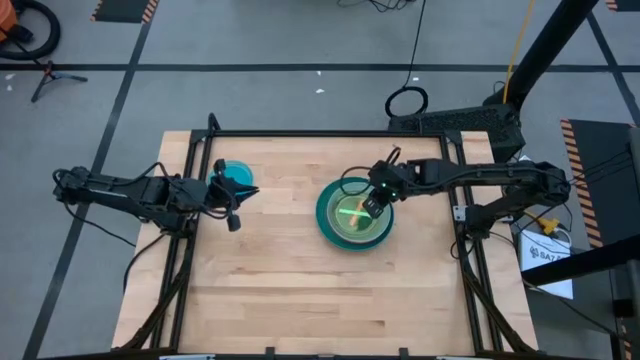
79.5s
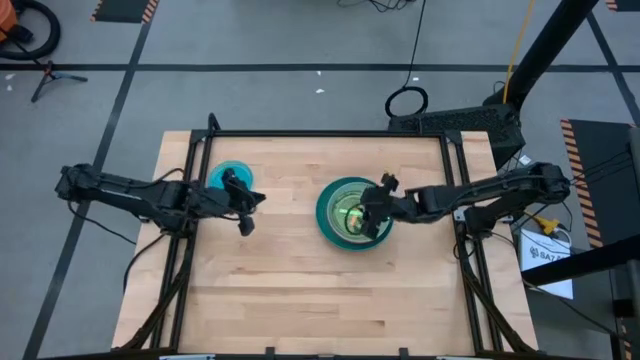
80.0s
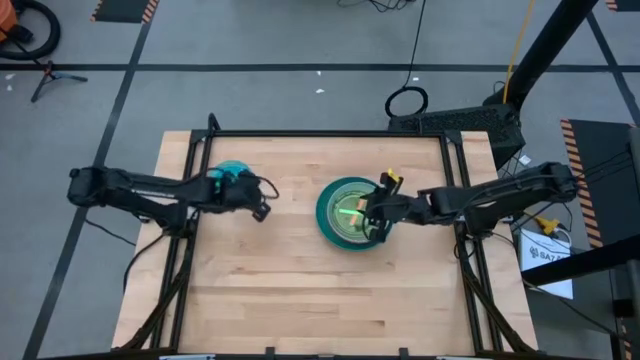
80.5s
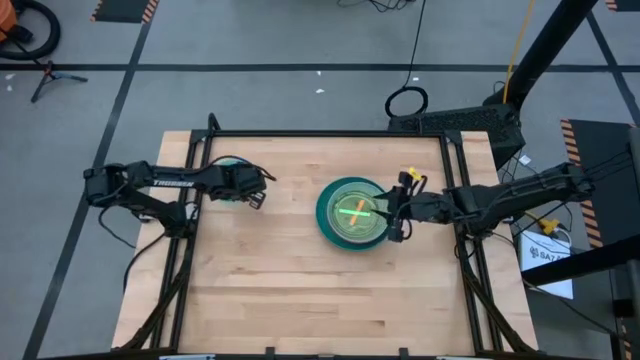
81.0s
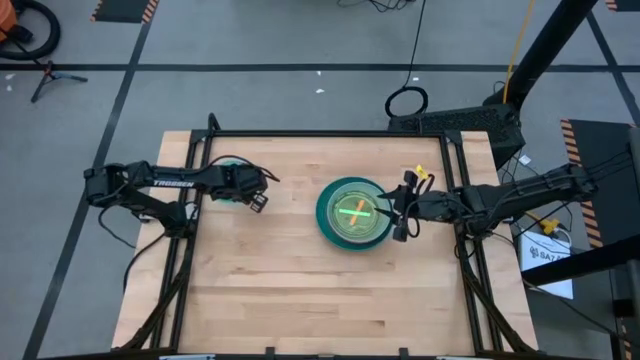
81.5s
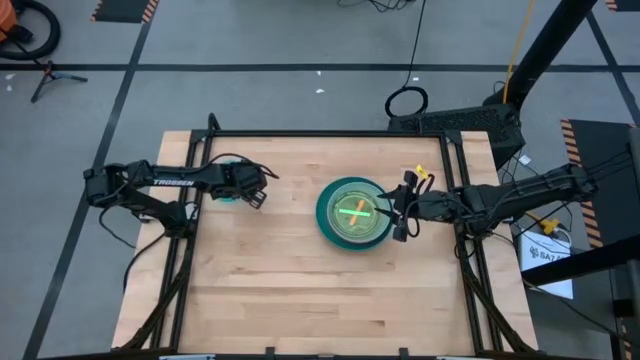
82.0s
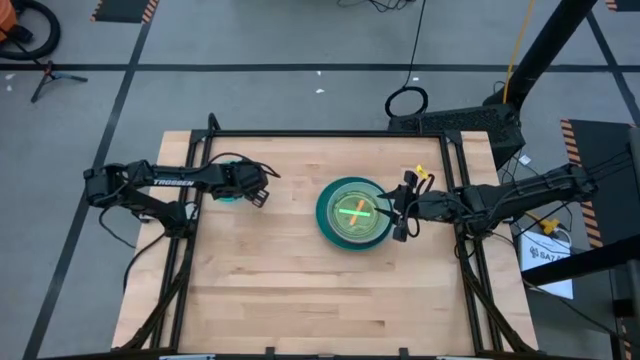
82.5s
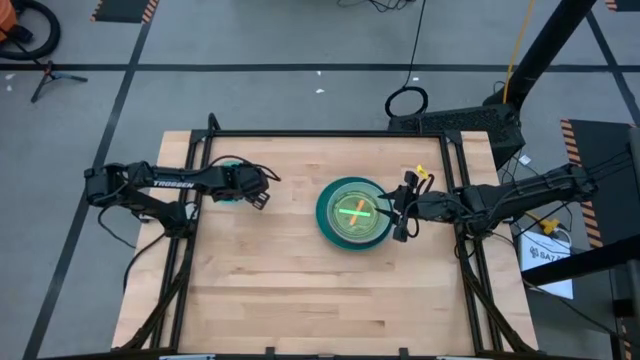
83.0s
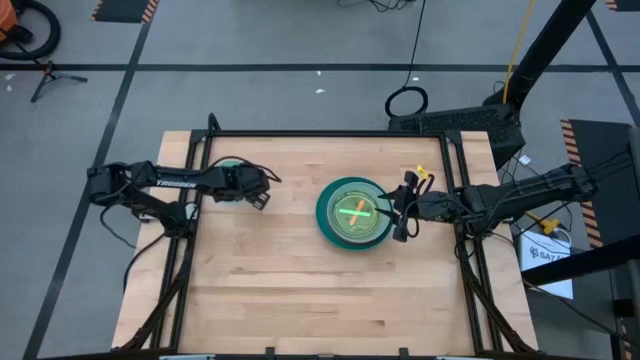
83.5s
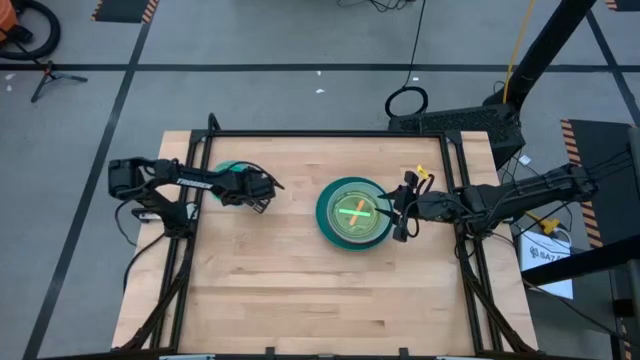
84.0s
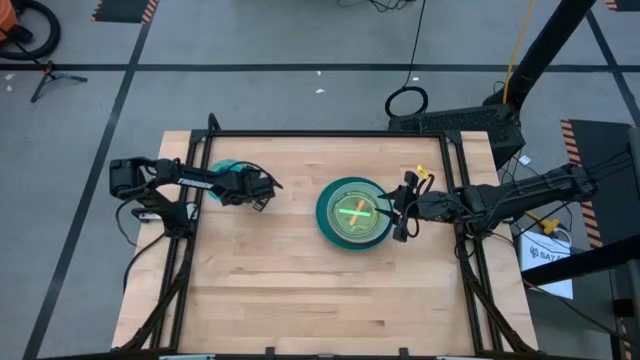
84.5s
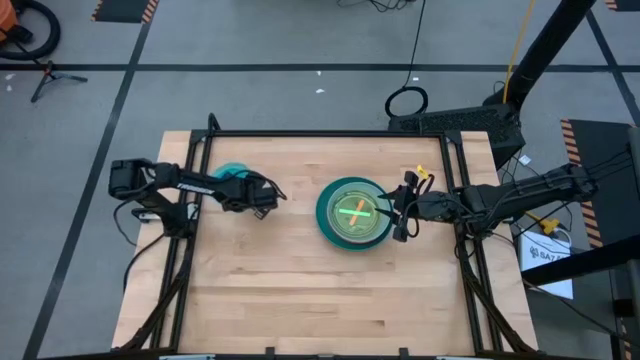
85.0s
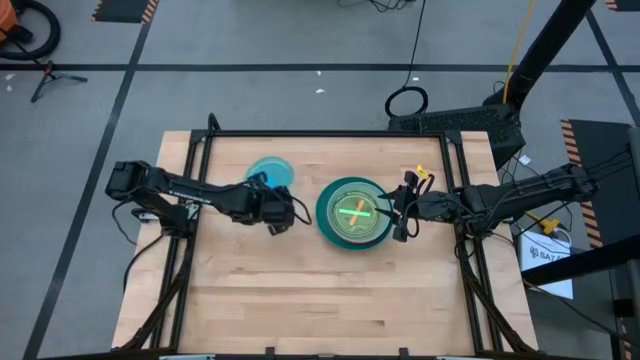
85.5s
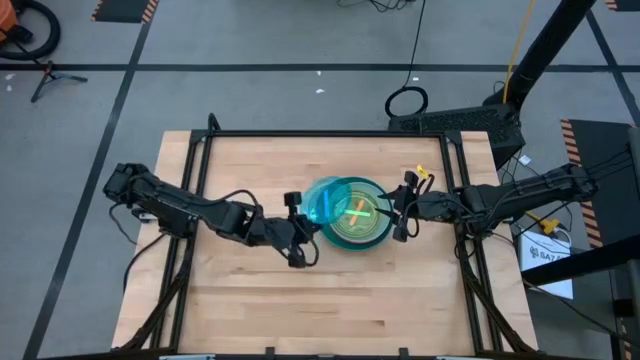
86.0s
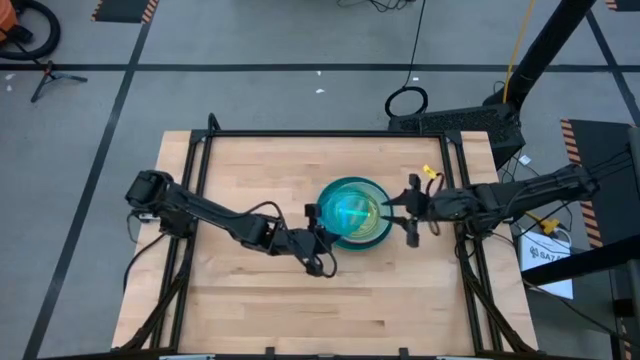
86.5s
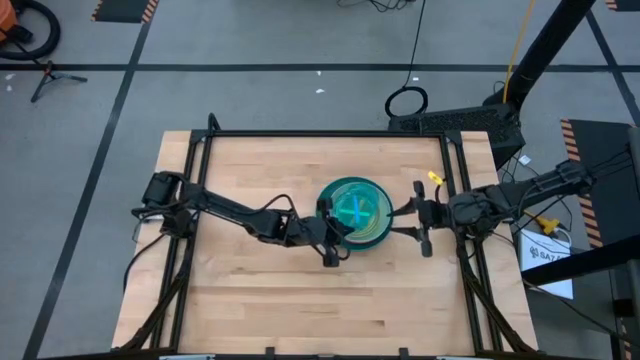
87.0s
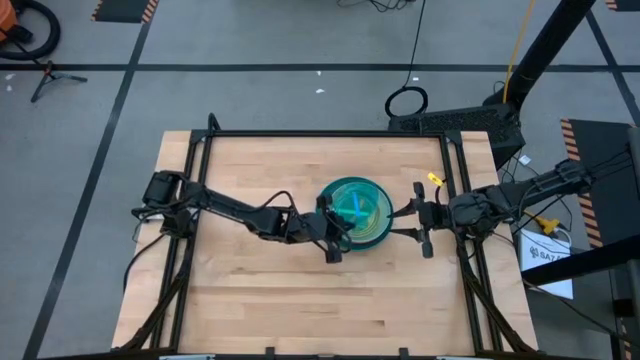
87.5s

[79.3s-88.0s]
Task: Stack plastic plates
Stack the blue plate on top of the green plate

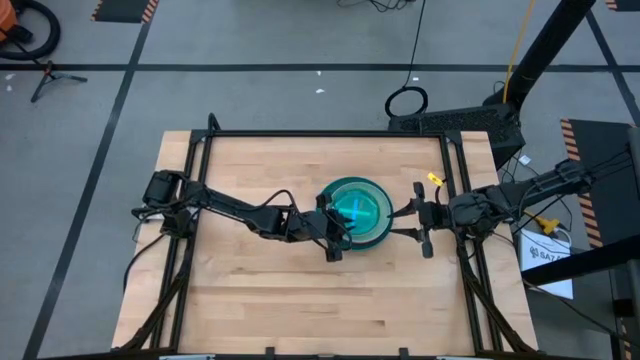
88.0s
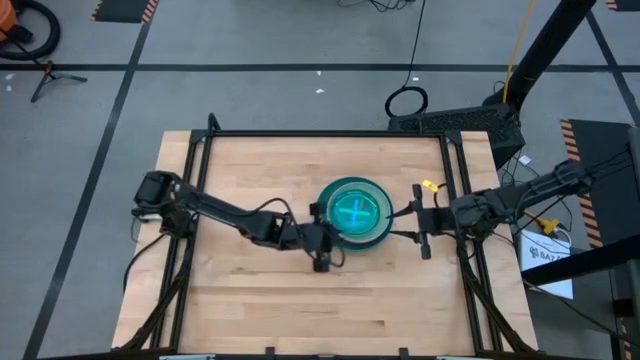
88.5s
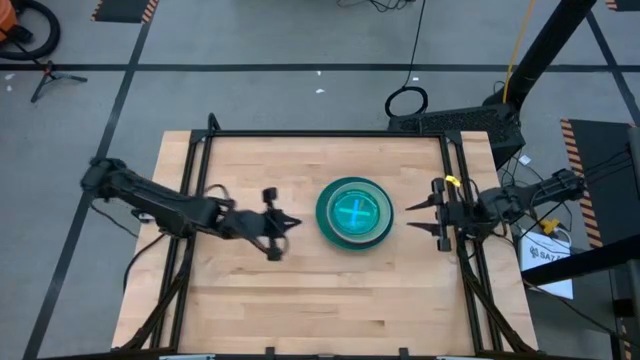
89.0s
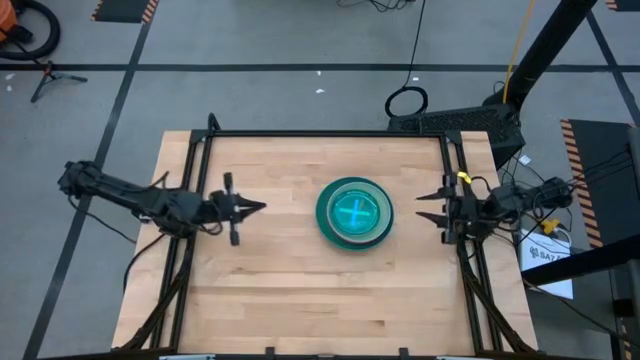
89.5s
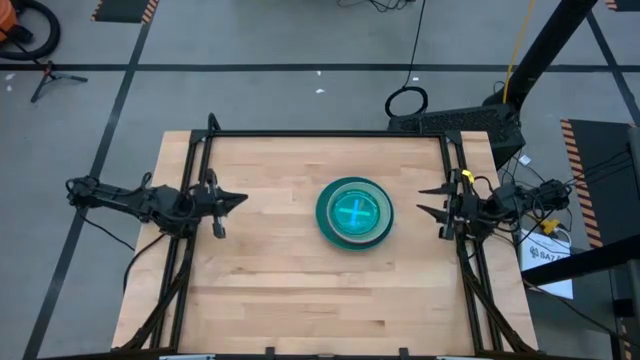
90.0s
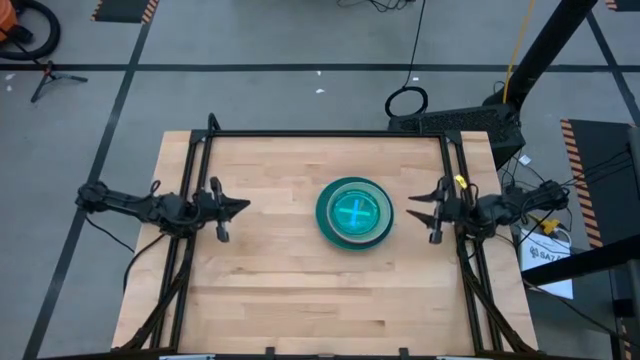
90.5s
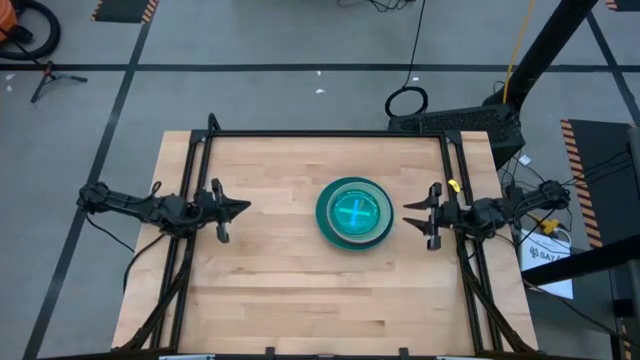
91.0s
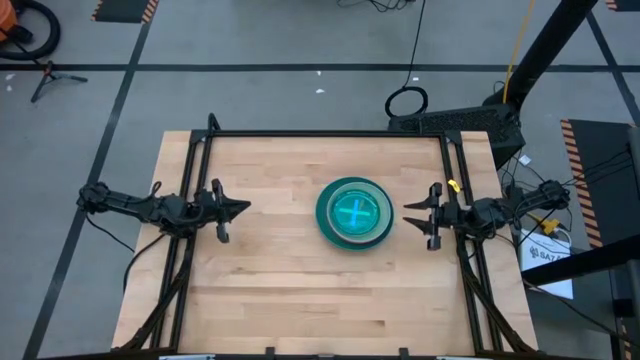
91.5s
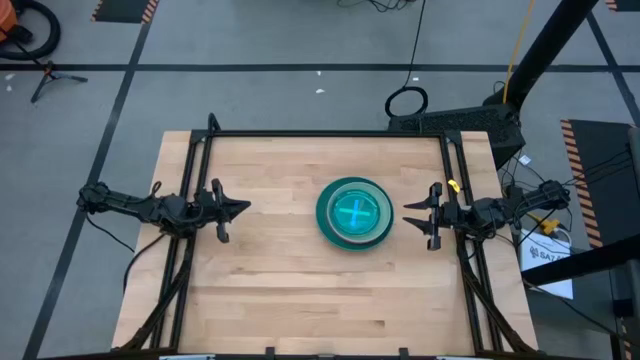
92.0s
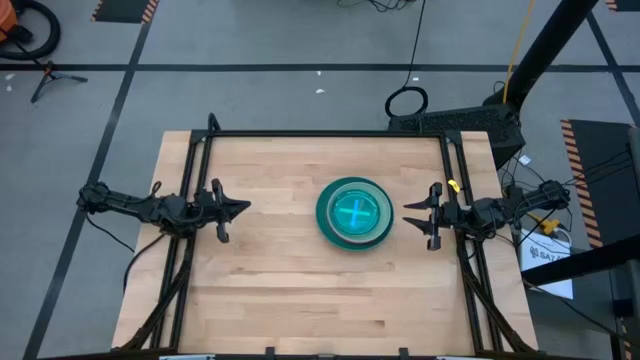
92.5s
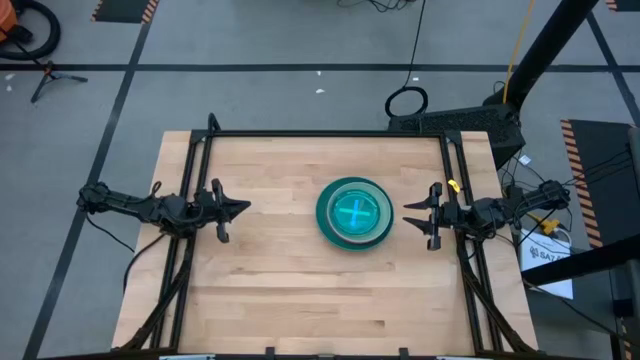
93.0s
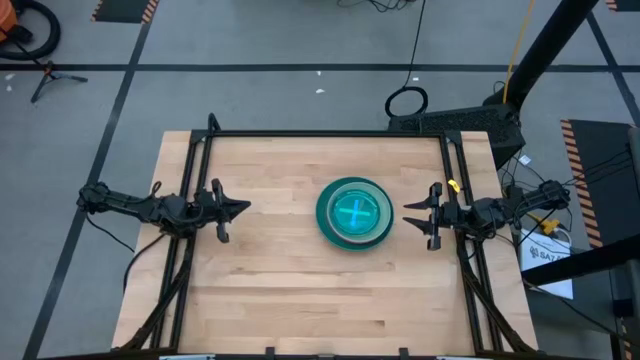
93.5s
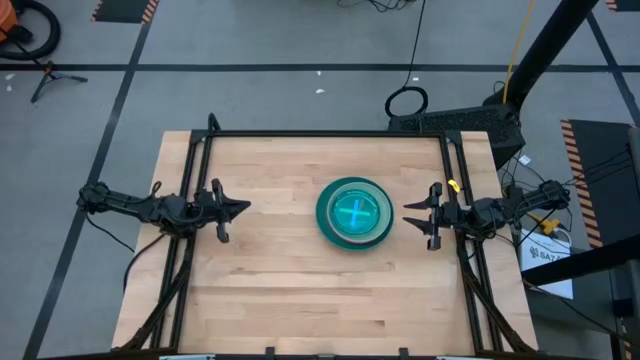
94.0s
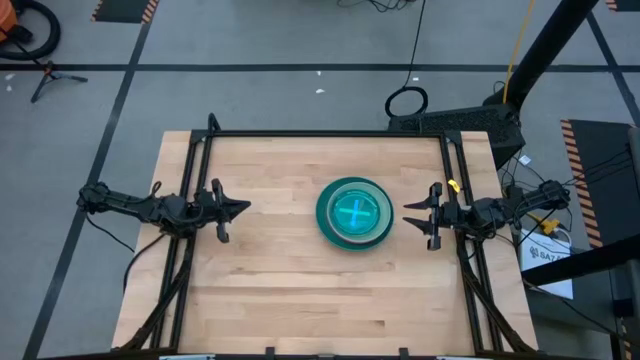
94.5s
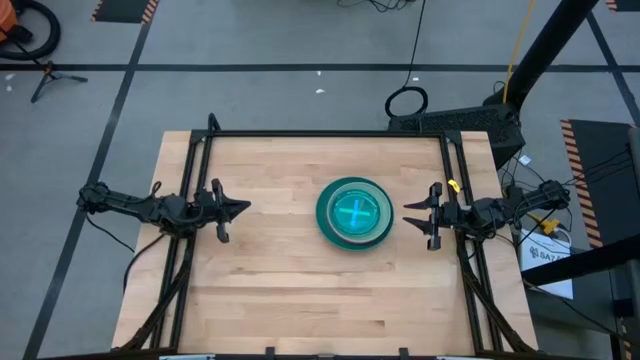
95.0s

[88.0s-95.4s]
Return to Home Position

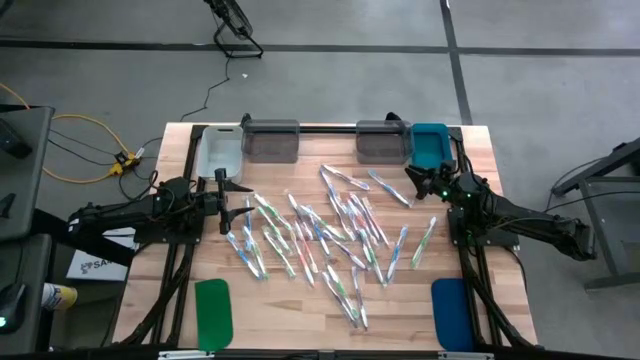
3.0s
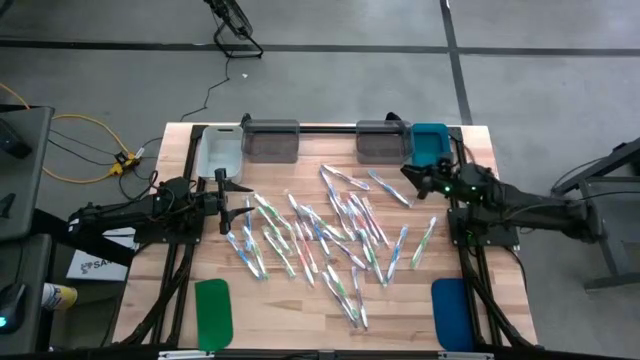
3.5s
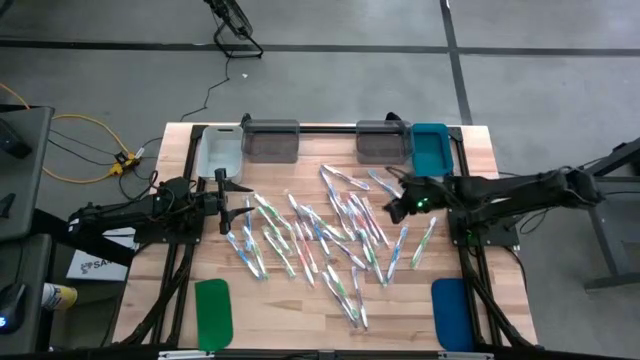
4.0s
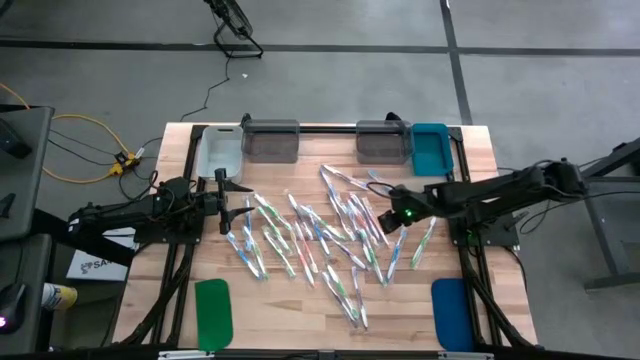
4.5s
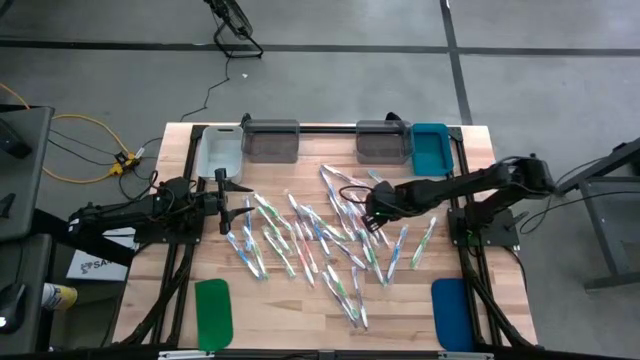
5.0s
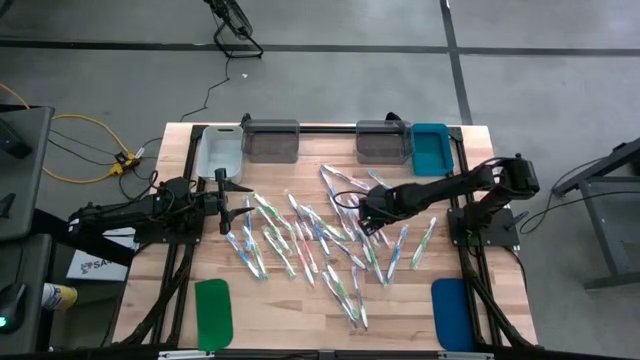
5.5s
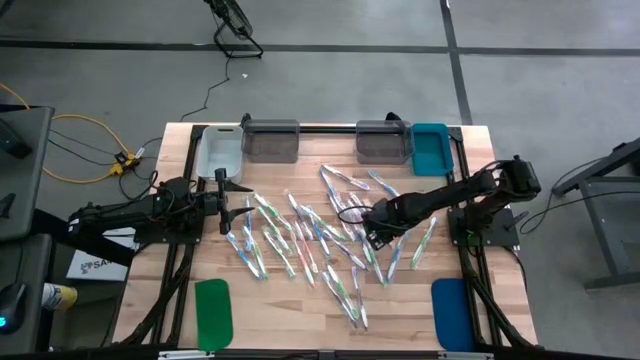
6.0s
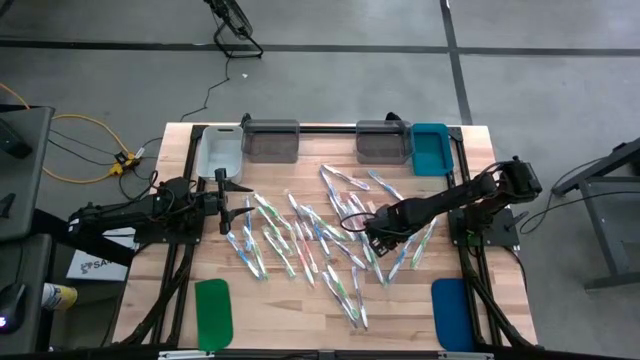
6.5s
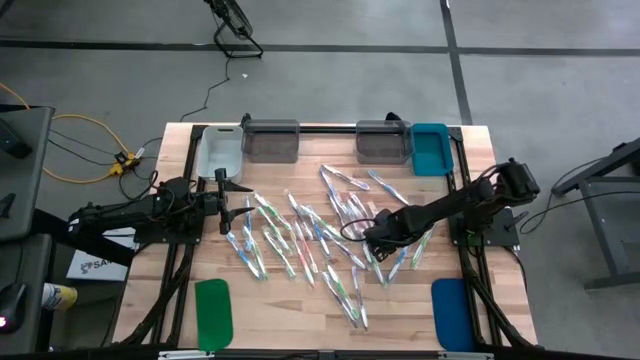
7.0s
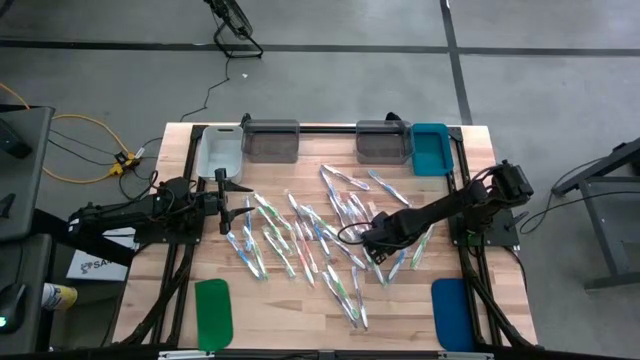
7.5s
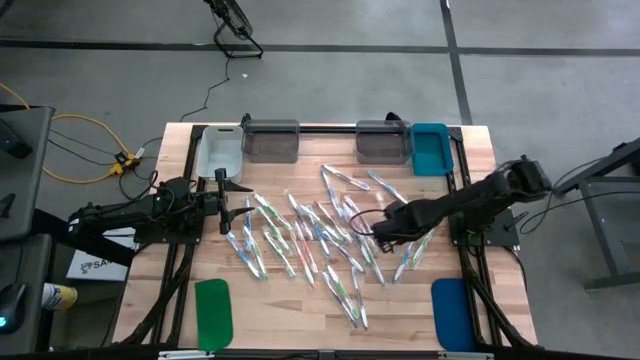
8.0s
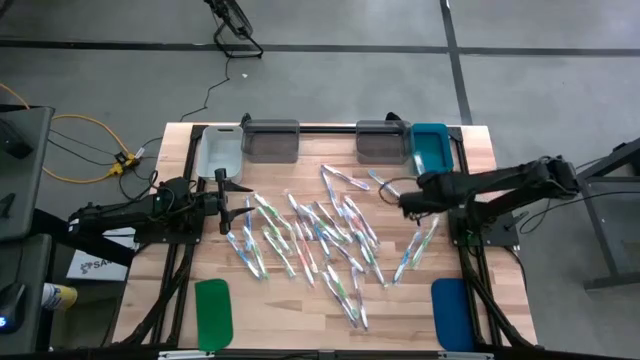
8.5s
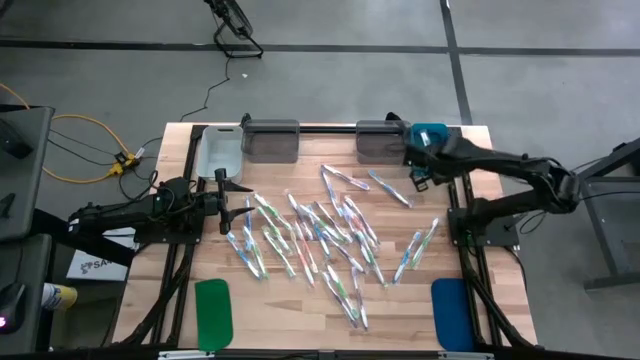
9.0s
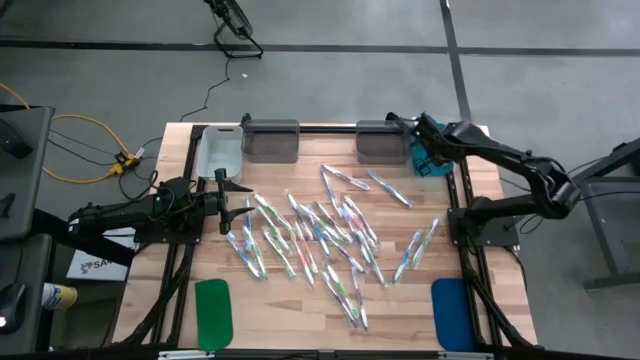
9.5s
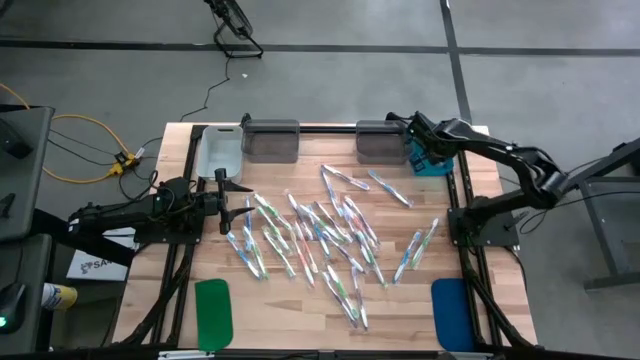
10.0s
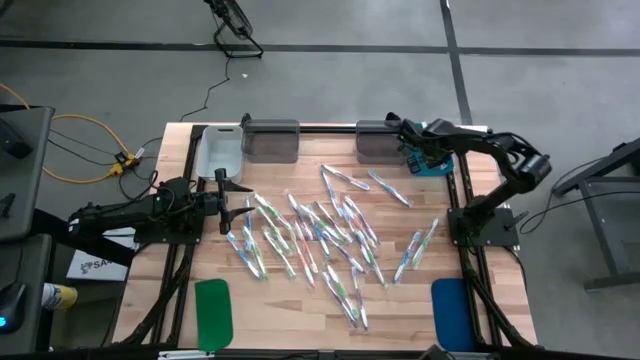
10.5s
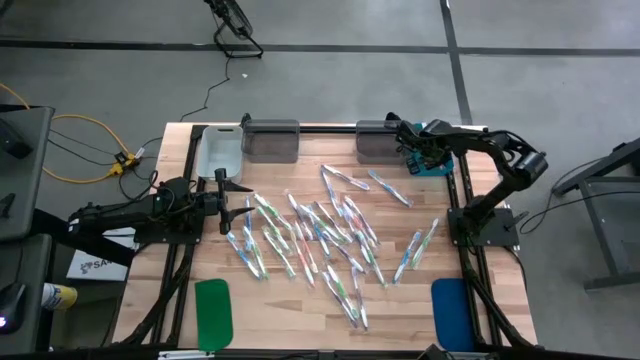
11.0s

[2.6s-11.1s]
Task: Pick & Place Toothbrushes
Put the orange toothbrush into the blue bin
